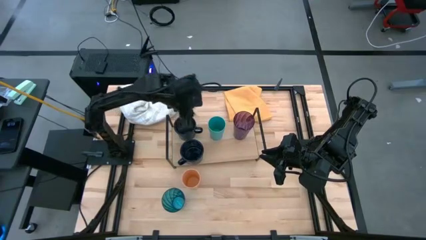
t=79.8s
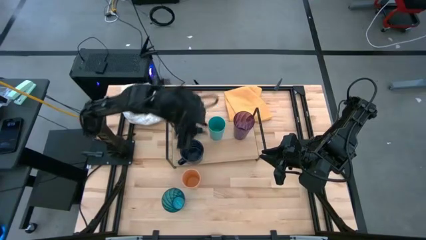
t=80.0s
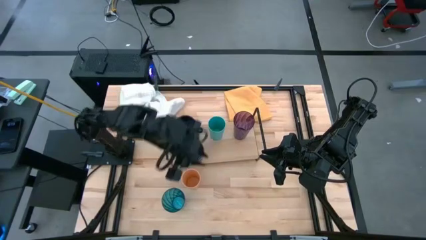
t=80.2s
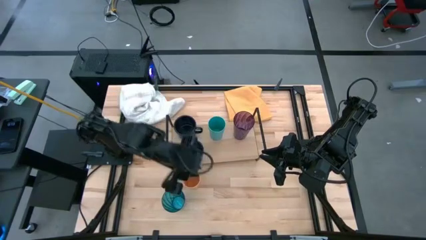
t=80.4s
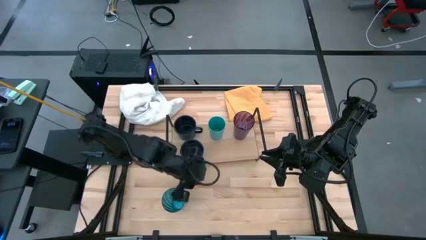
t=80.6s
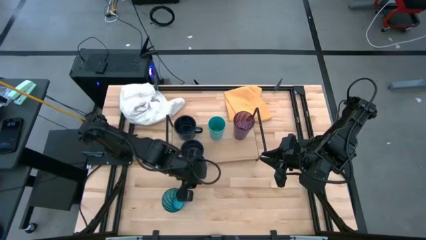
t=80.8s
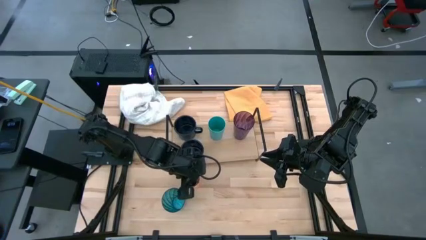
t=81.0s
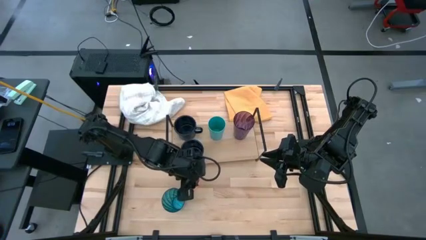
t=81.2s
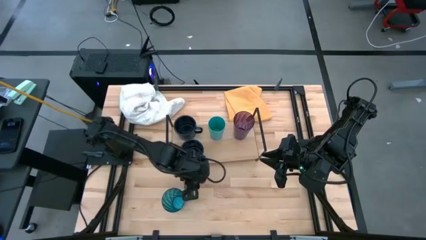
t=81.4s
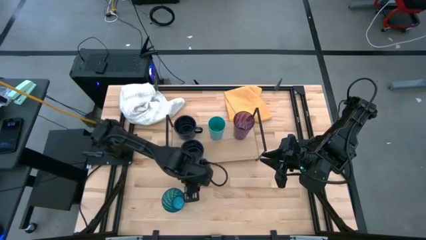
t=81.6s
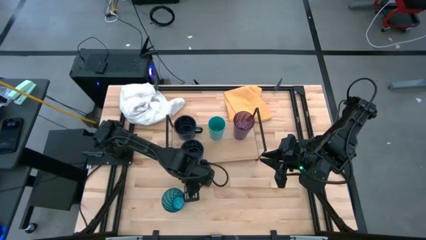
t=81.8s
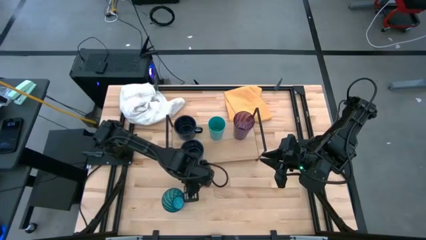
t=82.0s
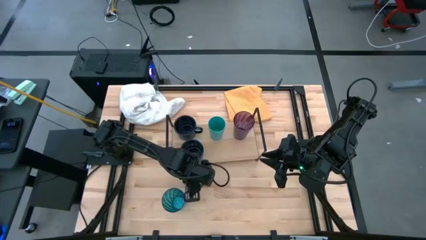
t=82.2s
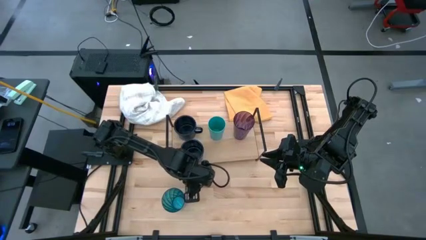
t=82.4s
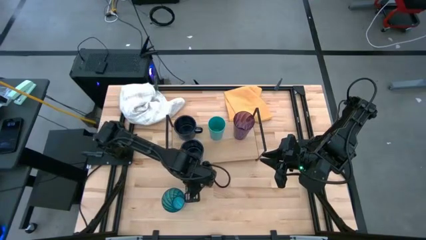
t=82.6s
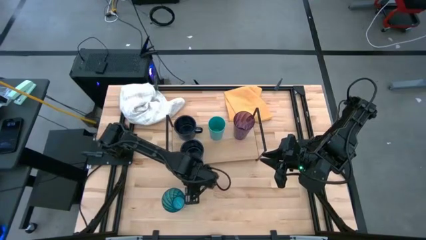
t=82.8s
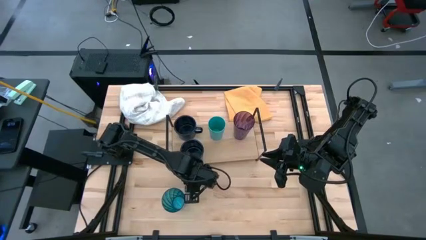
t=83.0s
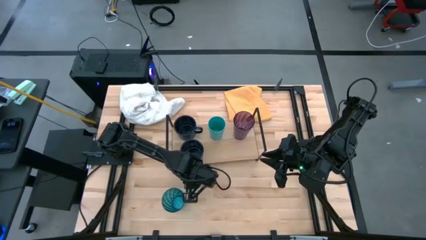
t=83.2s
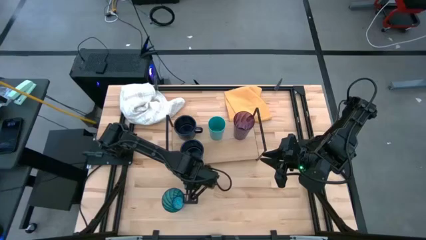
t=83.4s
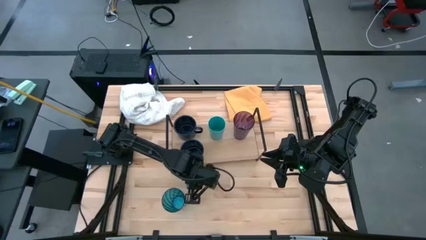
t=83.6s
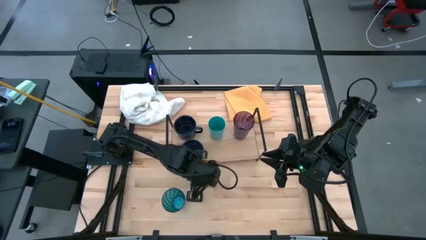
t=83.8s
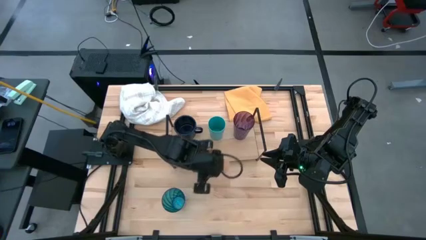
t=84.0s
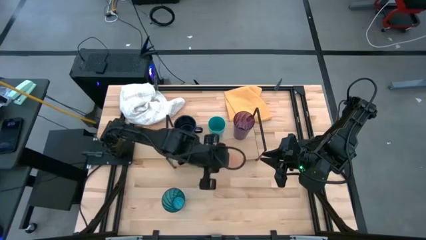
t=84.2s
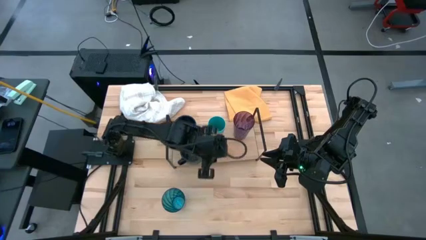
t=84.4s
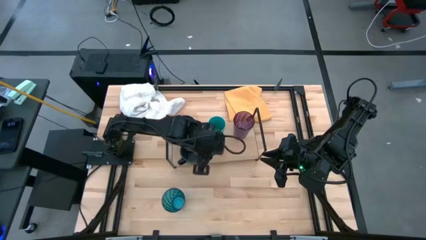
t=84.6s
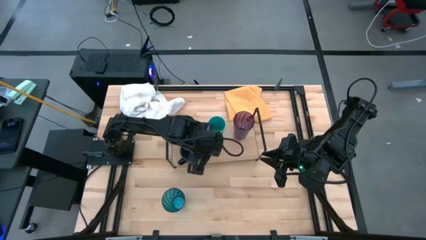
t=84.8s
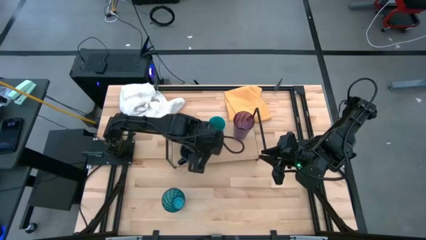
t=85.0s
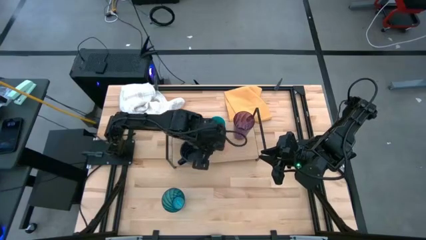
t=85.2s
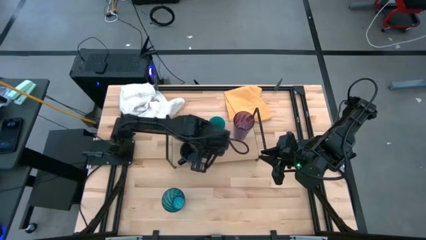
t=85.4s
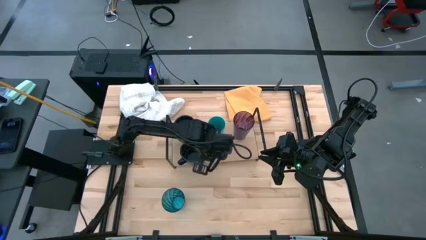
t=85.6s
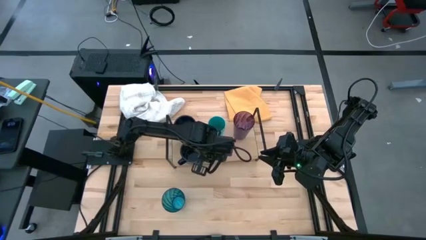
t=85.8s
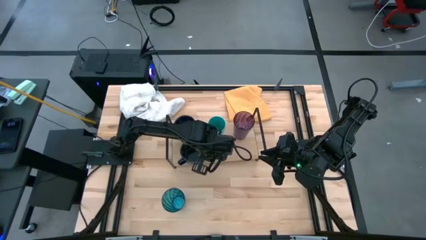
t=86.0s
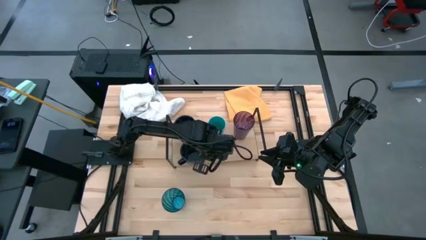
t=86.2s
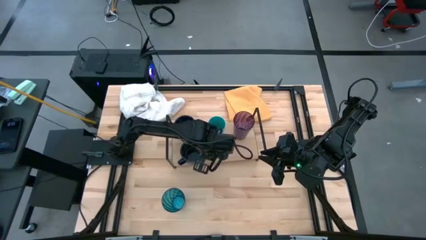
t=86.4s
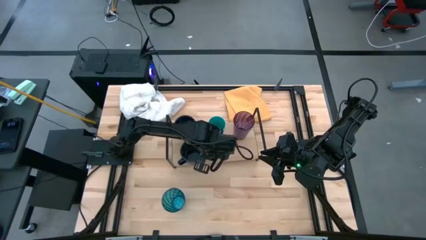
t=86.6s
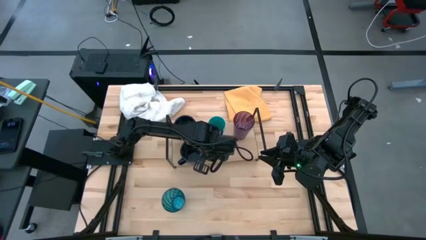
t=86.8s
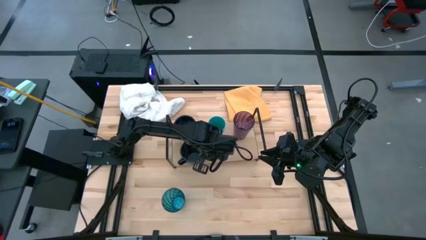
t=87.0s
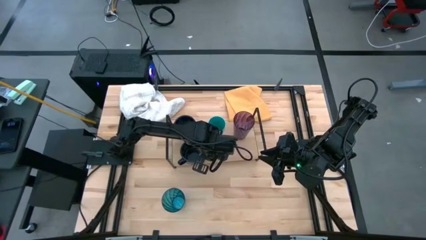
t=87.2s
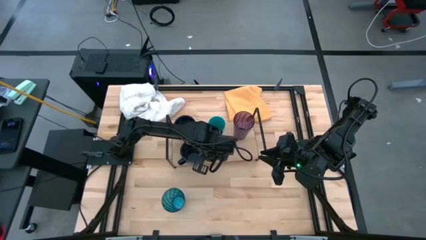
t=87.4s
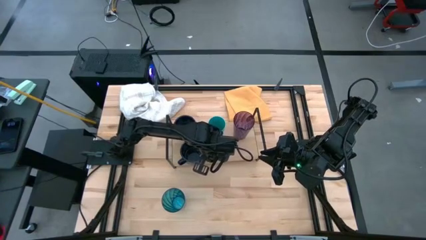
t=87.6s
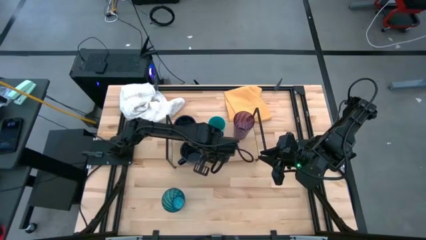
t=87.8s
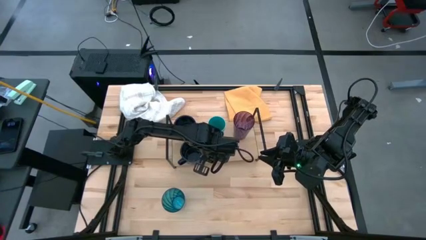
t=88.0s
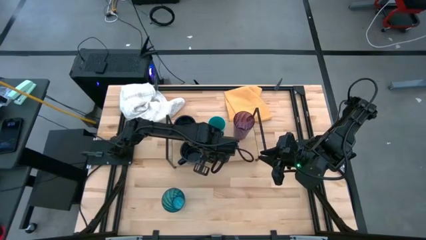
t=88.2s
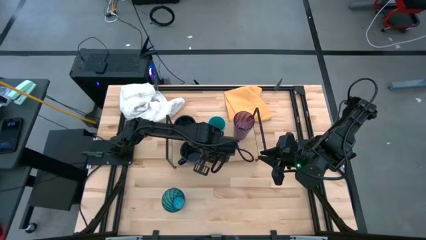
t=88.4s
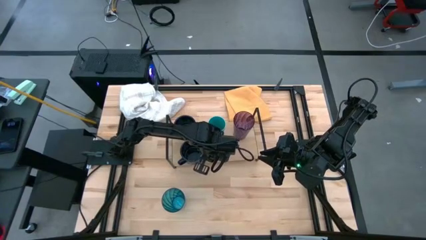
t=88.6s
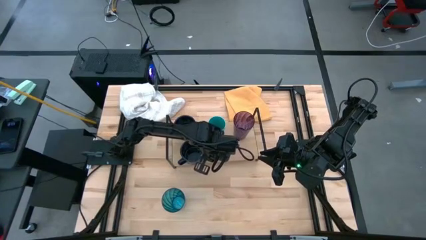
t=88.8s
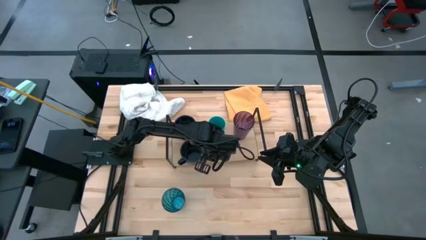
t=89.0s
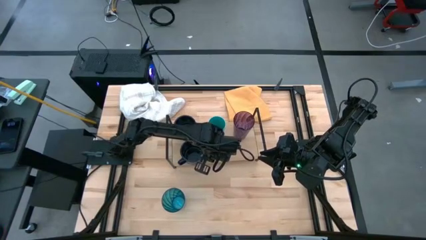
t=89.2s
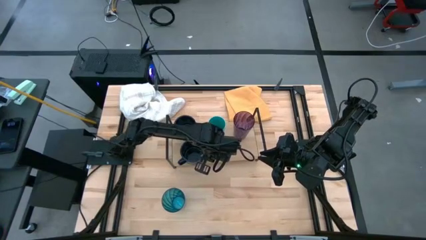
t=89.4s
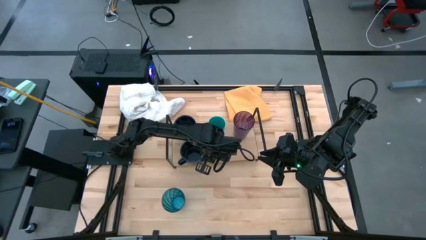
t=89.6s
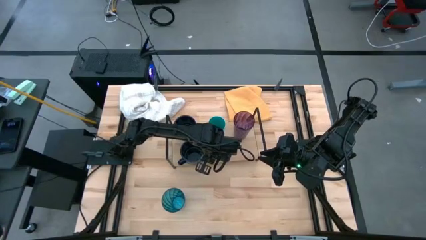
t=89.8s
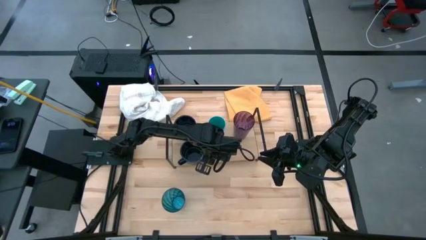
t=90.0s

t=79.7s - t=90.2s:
Task: Stack small to large cups/mugs on shelf
Put the orange cup on the shelf

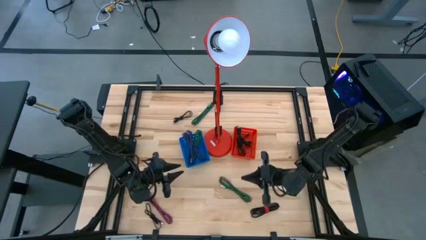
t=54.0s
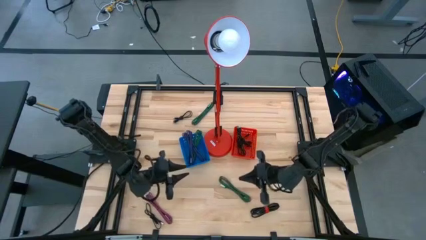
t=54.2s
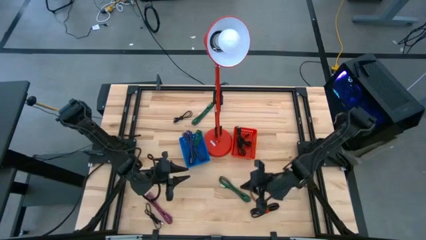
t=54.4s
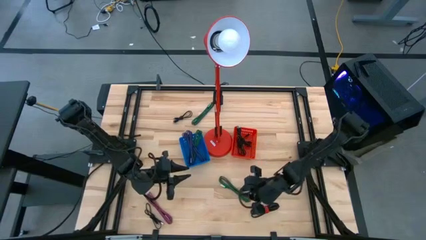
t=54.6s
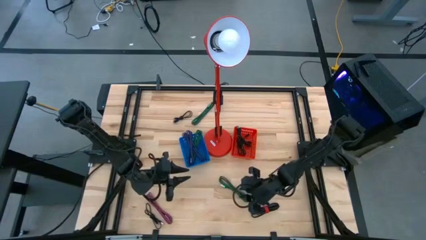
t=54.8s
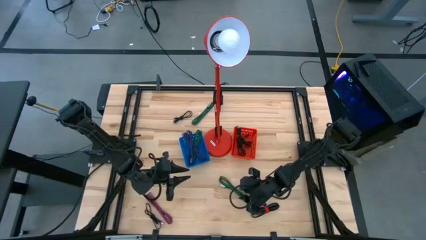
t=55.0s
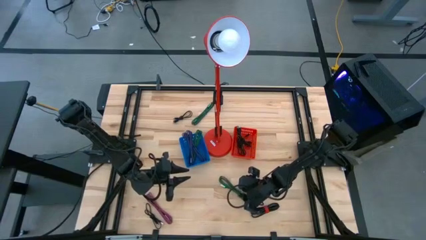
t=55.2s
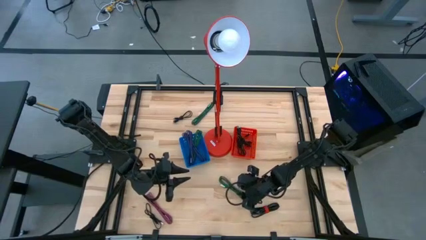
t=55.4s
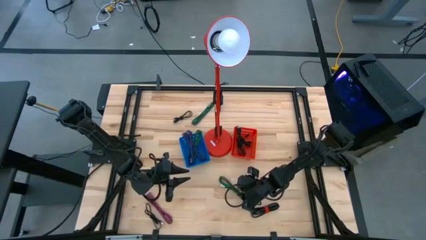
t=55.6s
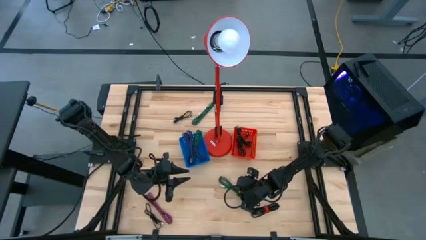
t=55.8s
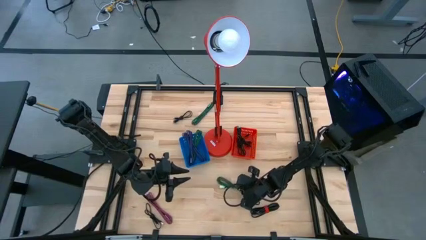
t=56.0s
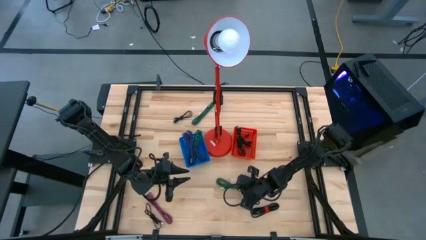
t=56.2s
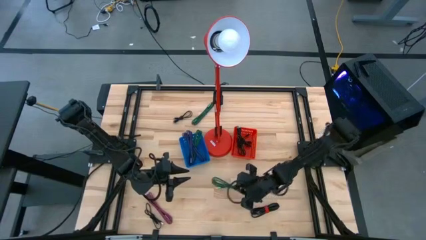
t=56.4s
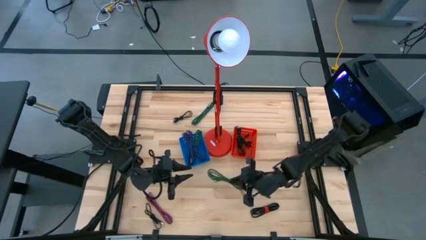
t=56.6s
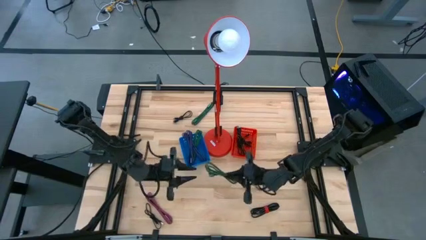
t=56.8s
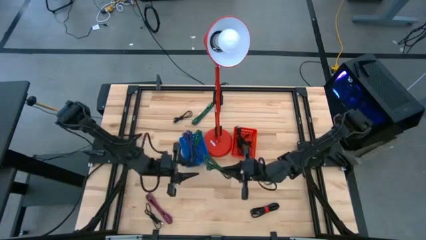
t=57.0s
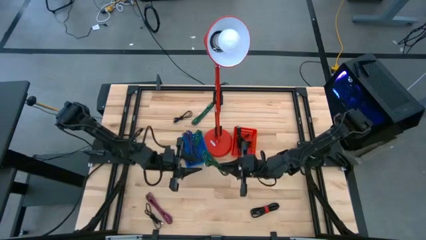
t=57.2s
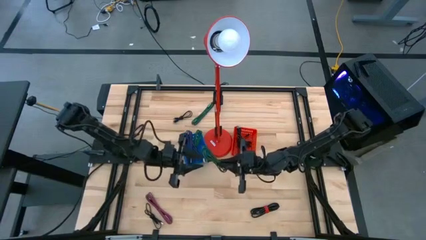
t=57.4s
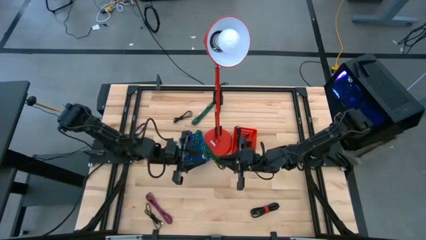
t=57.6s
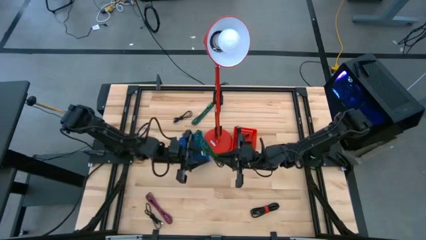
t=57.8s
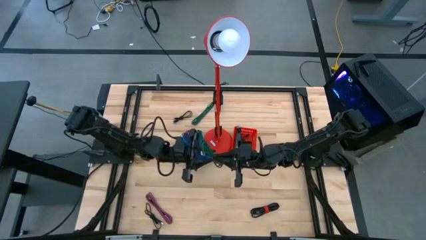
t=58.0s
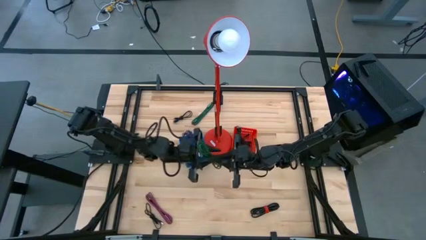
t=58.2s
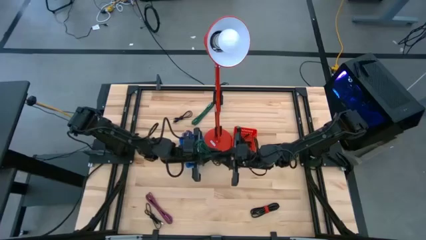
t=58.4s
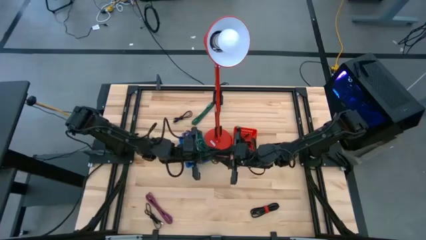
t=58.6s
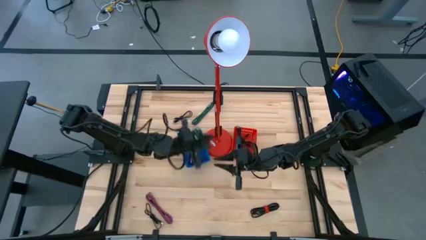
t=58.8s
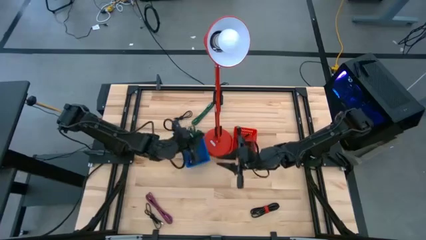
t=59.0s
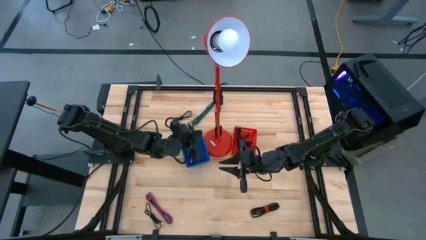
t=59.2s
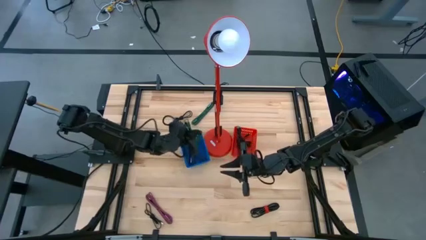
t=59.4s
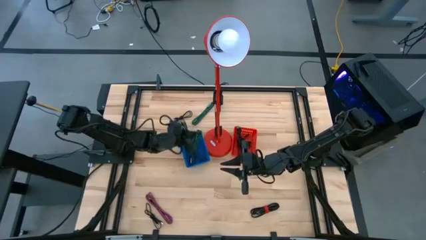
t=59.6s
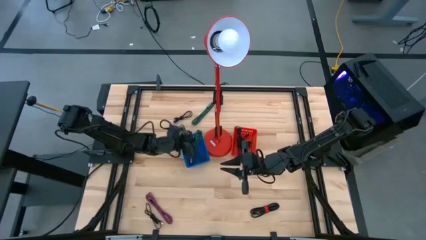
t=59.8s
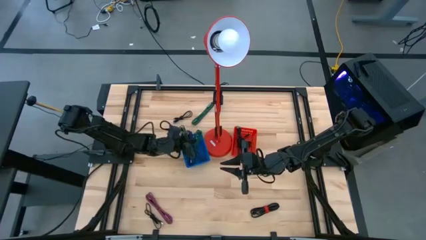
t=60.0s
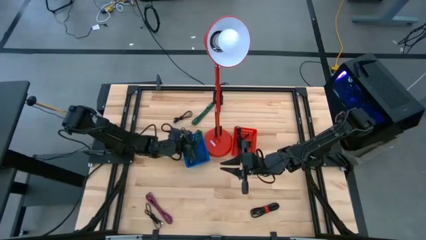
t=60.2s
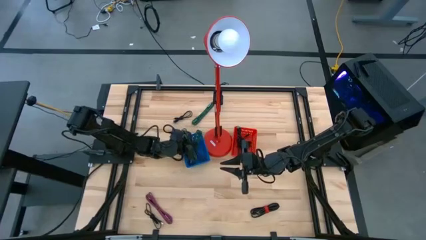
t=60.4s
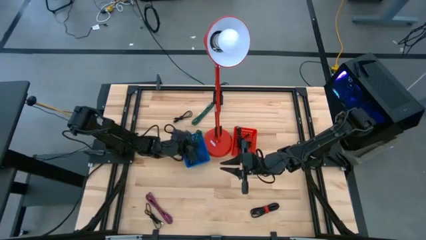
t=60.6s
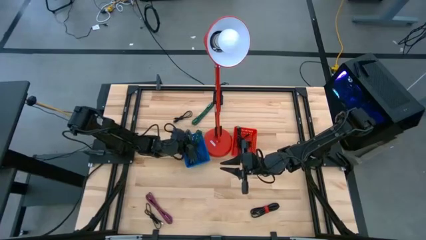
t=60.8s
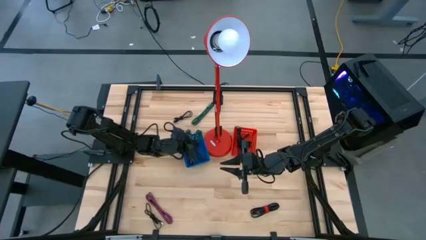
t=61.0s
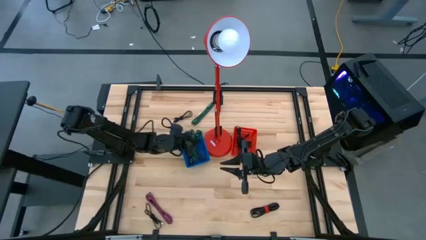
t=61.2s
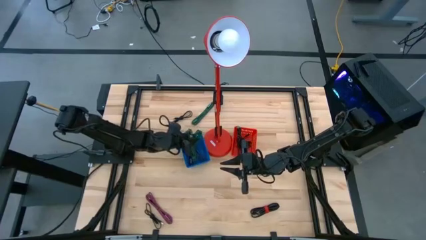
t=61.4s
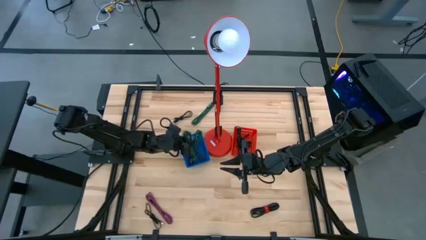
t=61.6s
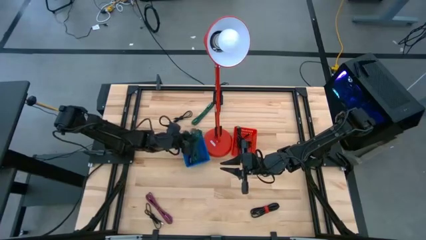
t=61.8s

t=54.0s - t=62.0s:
Task: Pick & Place USB Port
Put the green charger cable into the blue bin
